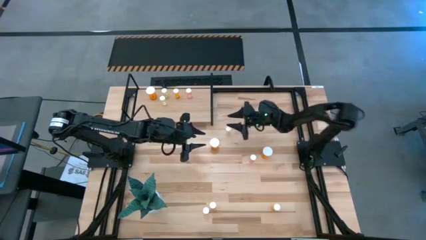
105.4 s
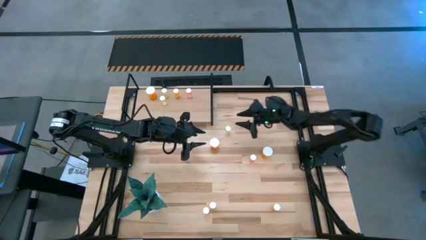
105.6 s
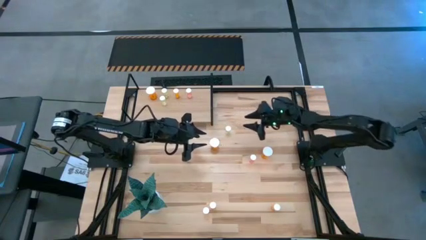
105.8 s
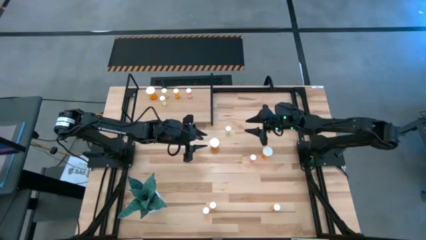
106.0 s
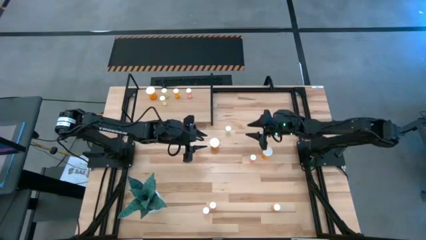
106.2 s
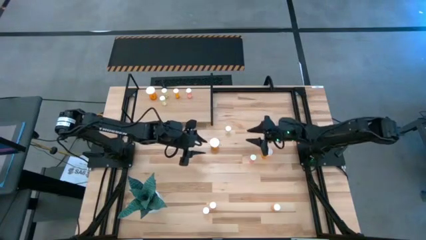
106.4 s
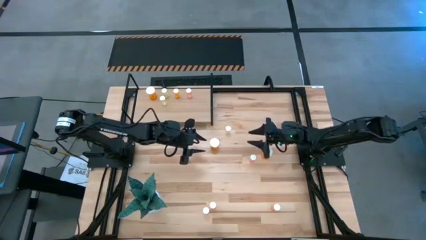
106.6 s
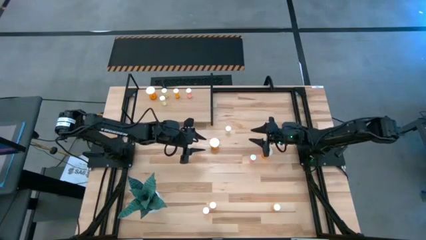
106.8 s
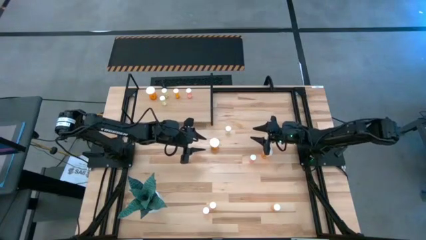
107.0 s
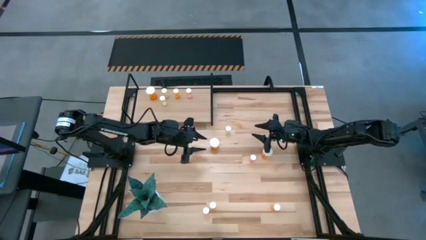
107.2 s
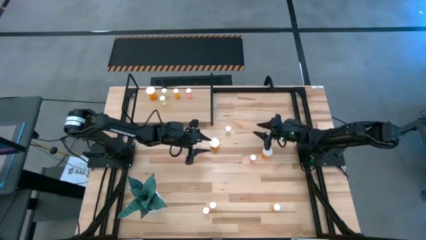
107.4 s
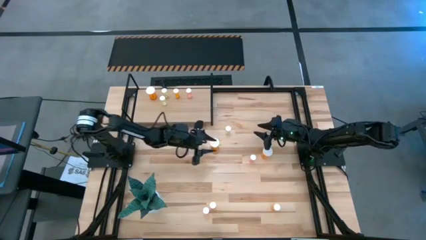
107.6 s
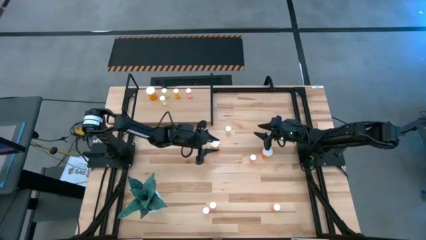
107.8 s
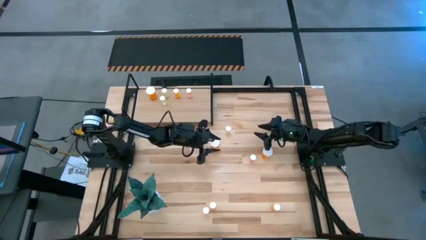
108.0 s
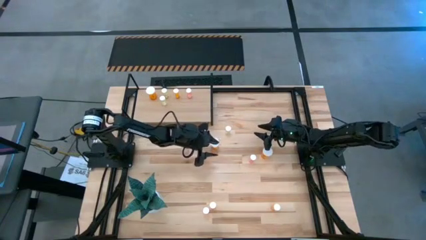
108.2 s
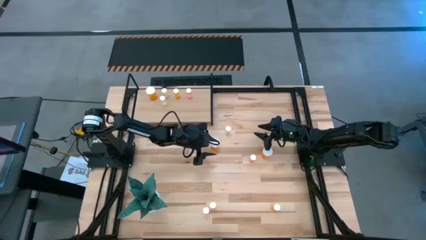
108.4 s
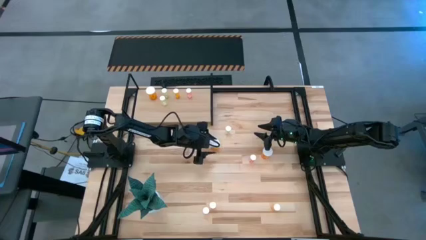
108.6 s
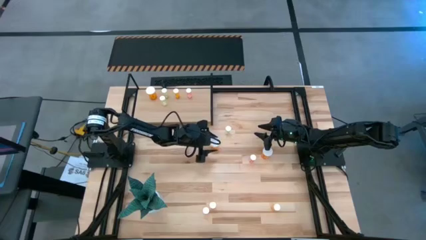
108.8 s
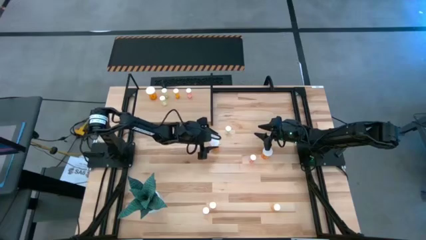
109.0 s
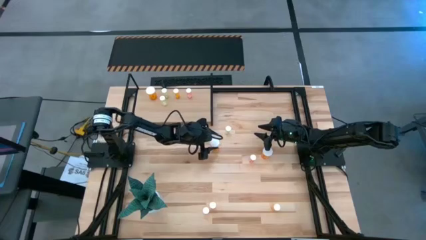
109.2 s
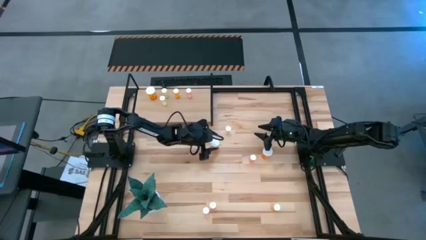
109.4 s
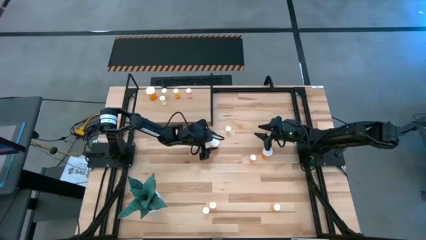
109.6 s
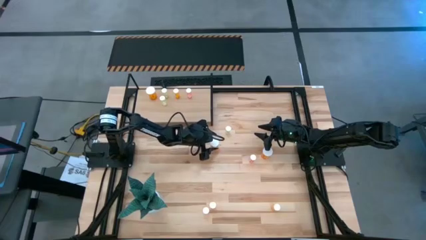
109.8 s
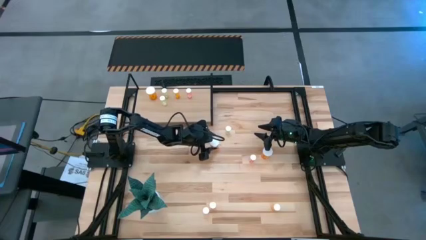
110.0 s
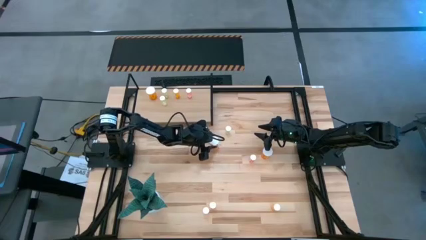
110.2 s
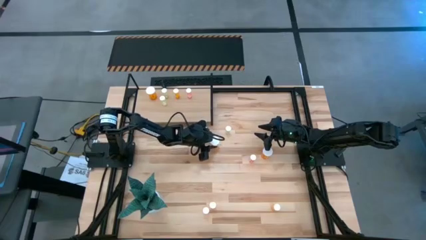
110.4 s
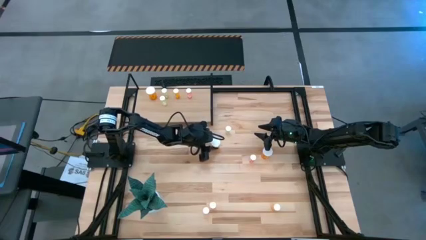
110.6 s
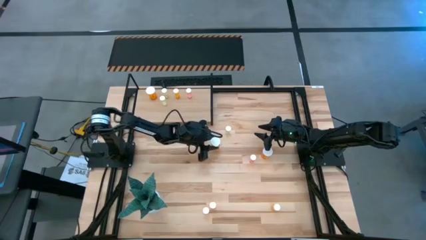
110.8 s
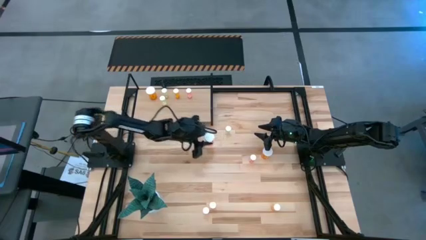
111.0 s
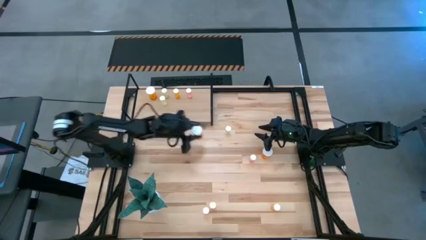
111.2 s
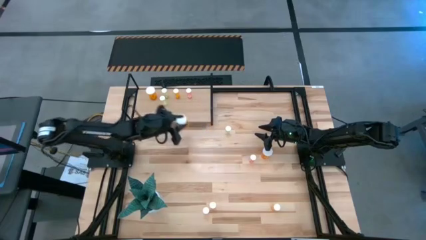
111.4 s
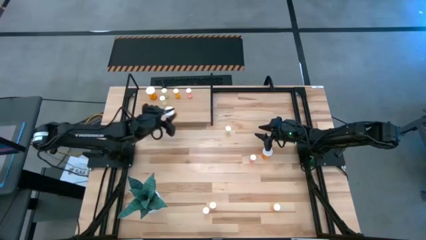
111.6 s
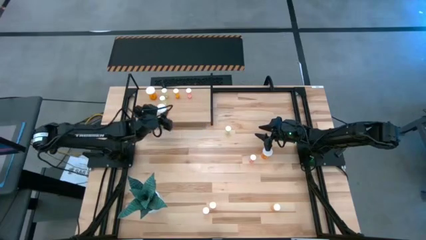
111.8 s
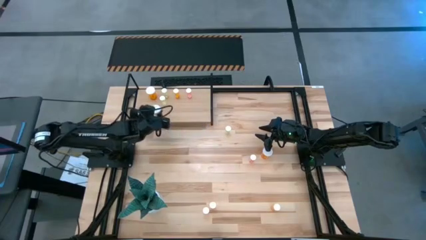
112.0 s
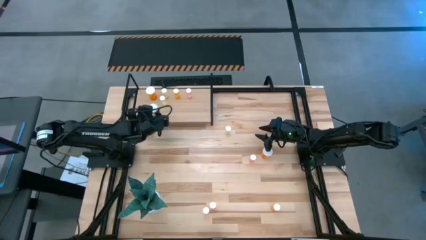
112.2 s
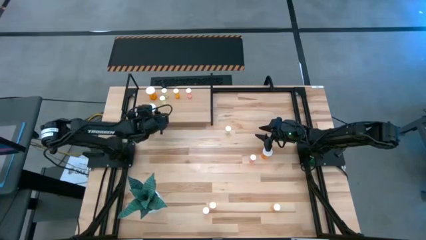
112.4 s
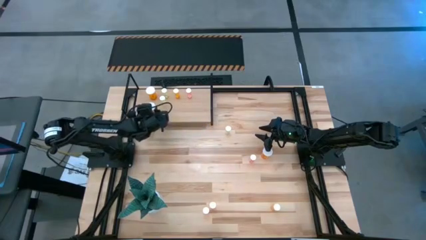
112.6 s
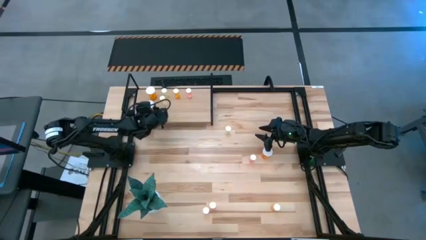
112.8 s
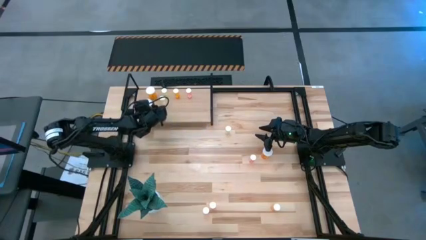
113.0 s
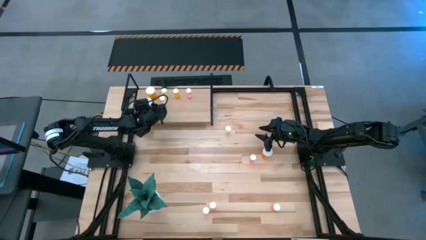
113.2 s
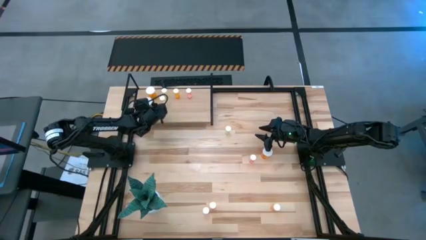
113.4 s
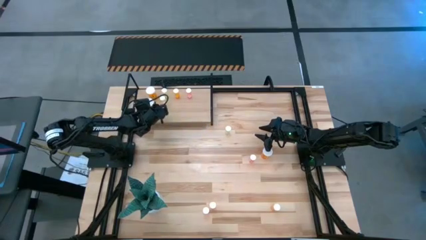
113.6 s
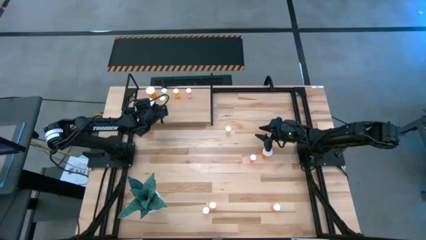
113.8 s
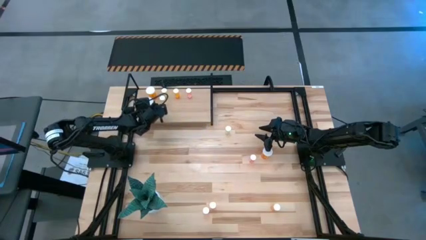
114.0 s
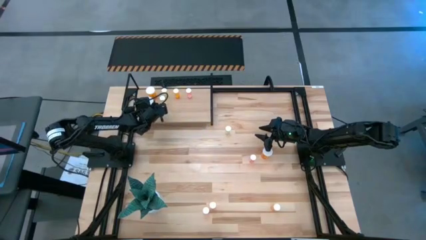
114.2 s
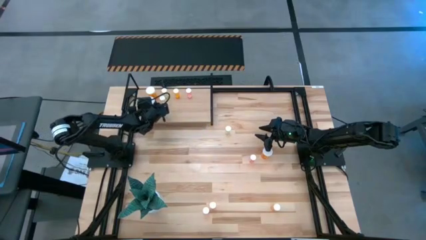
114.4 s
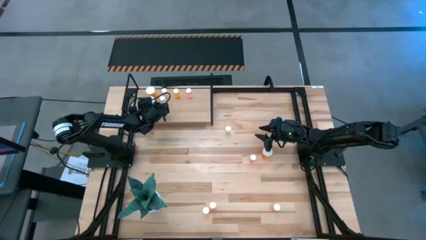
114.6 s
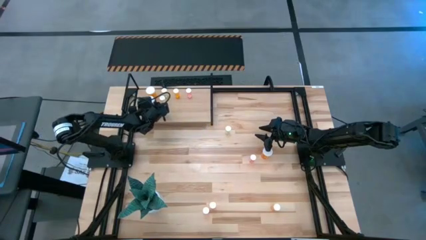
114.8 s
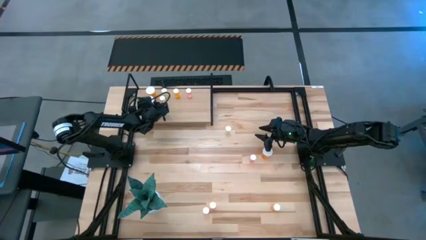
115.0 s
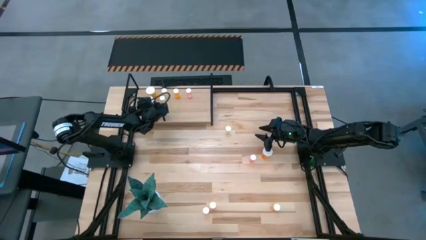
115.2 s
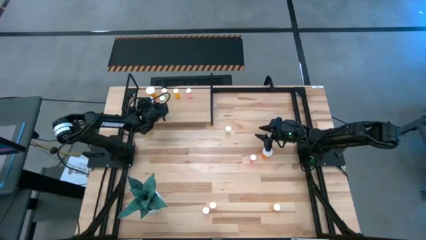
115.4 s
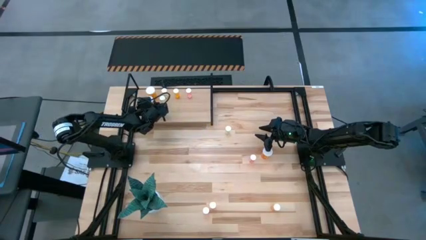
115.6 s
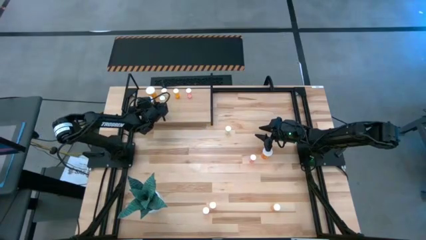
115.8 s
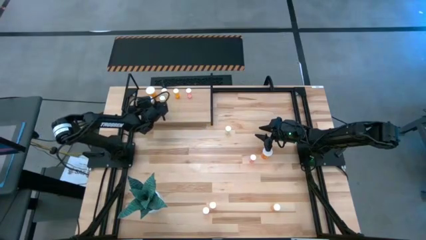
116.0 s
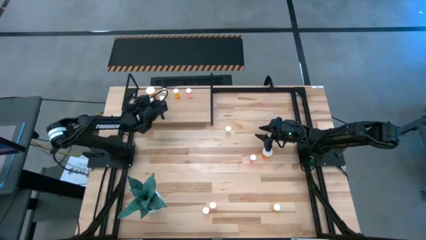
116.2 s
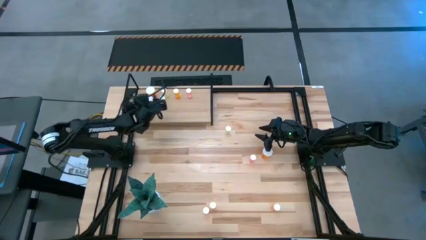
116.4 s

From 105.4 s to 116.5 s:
Task: Pick and place medicine bottles onto shelf by color
Put the left big orange pill bottle aligned with the other orange pill bottle on the shelf
